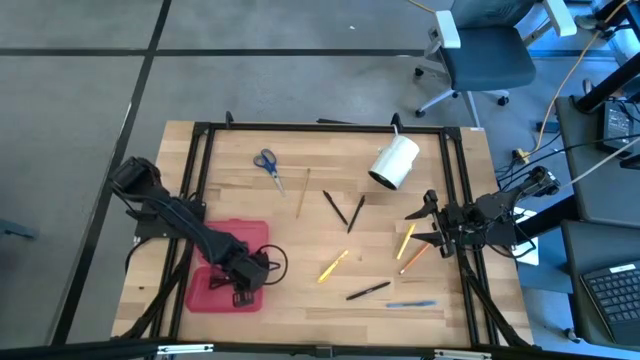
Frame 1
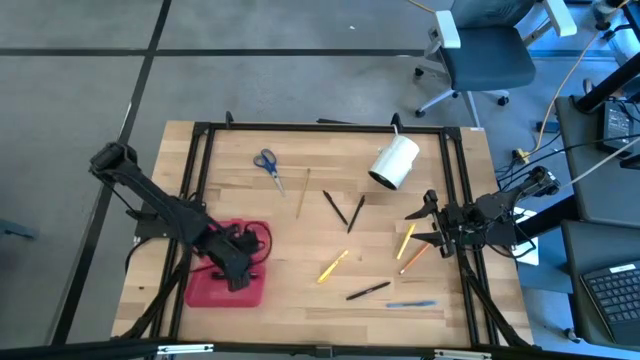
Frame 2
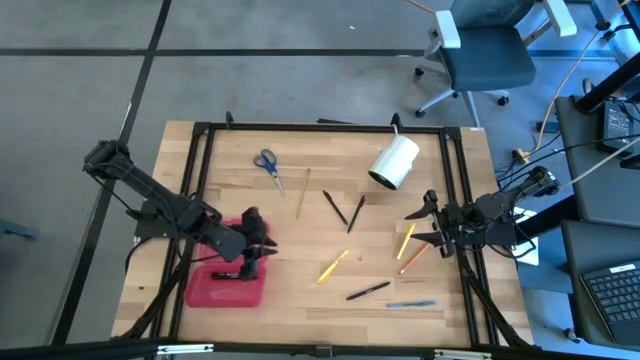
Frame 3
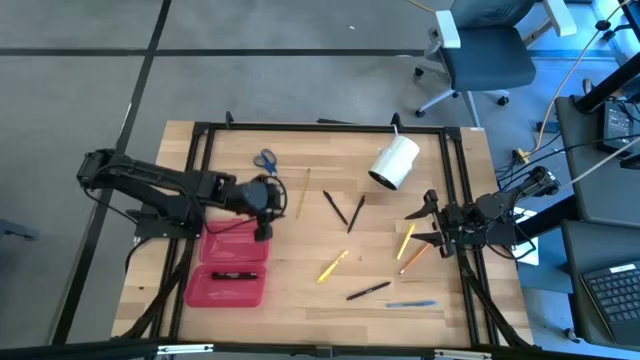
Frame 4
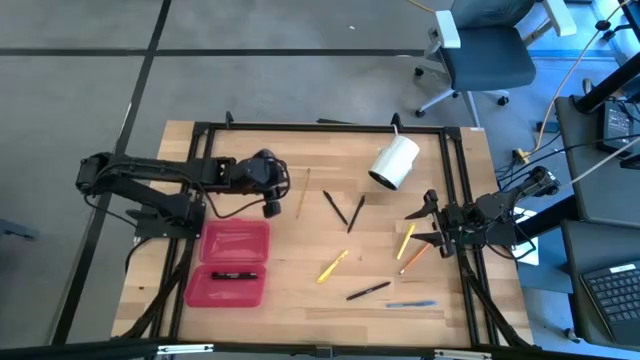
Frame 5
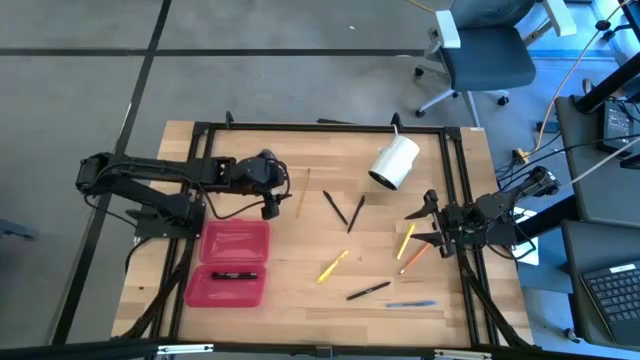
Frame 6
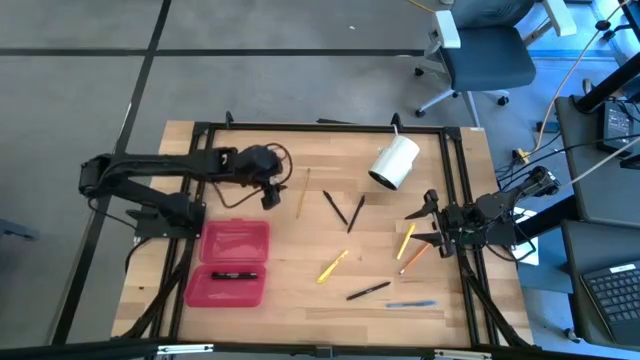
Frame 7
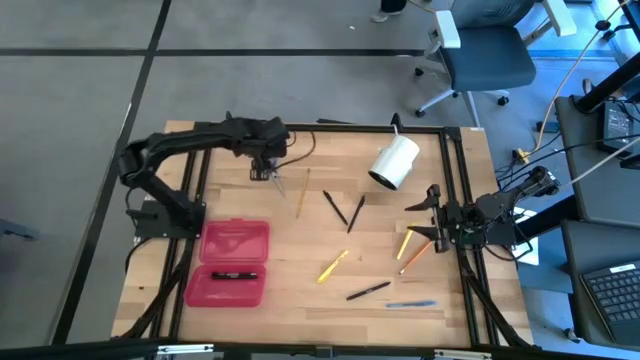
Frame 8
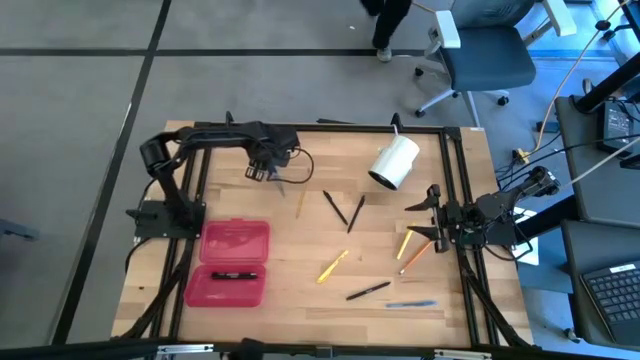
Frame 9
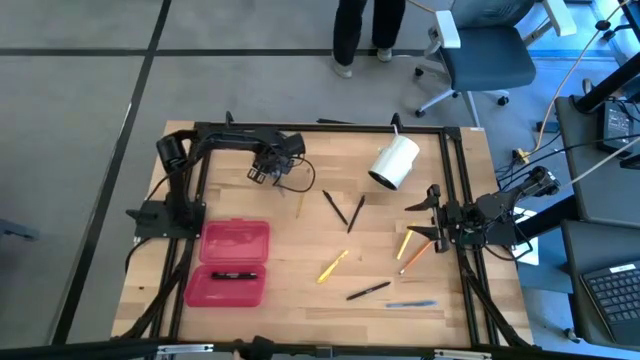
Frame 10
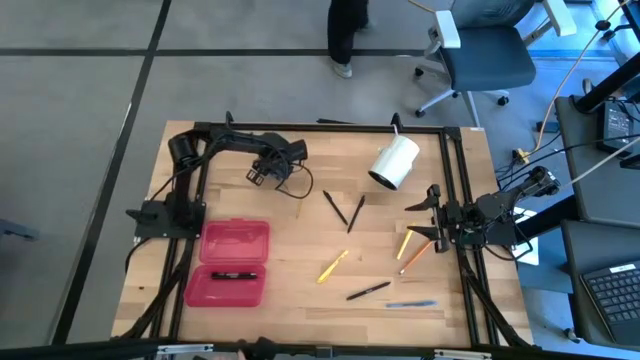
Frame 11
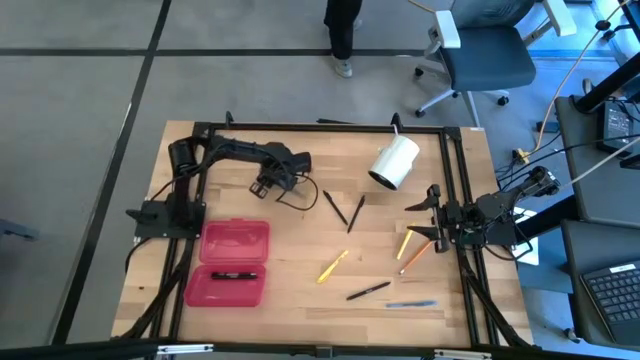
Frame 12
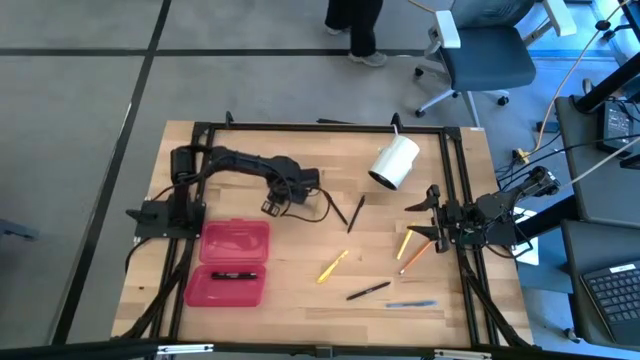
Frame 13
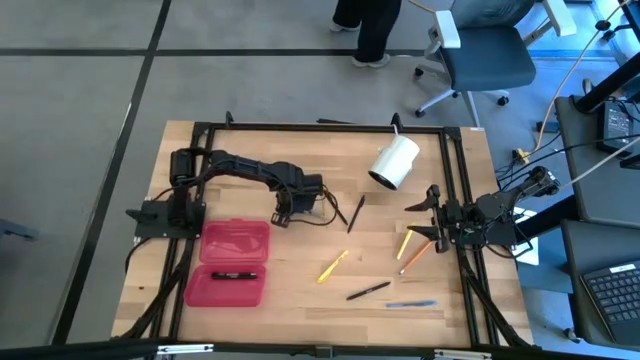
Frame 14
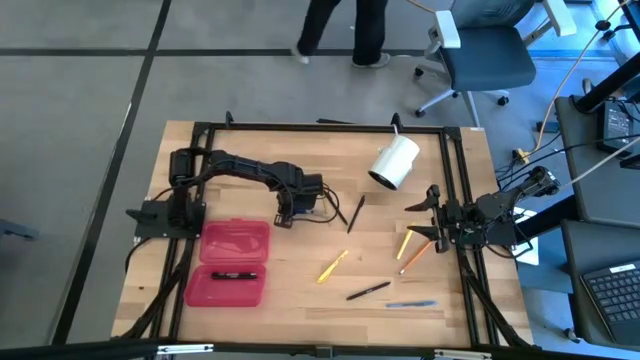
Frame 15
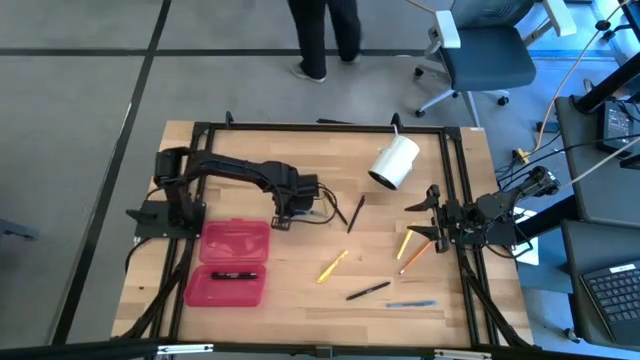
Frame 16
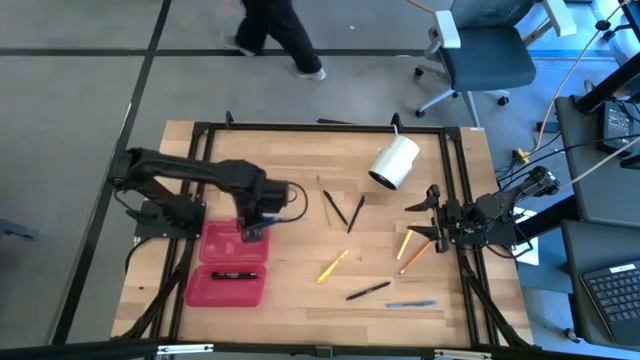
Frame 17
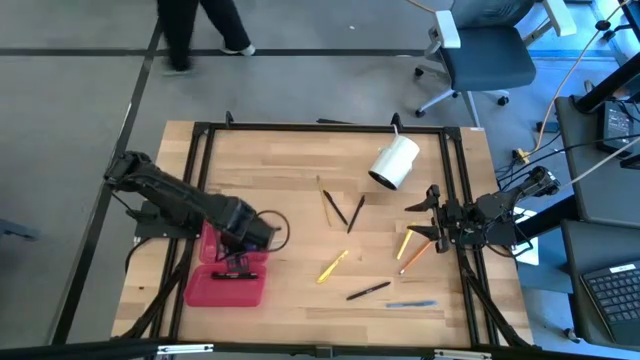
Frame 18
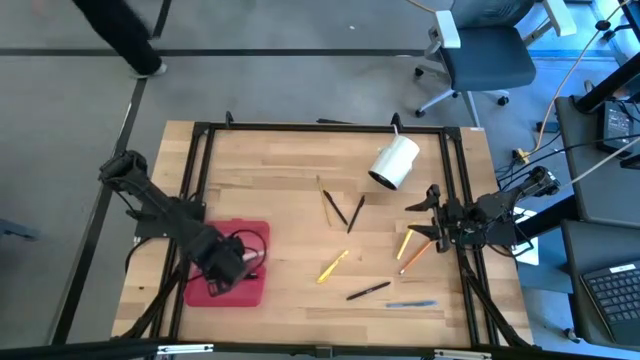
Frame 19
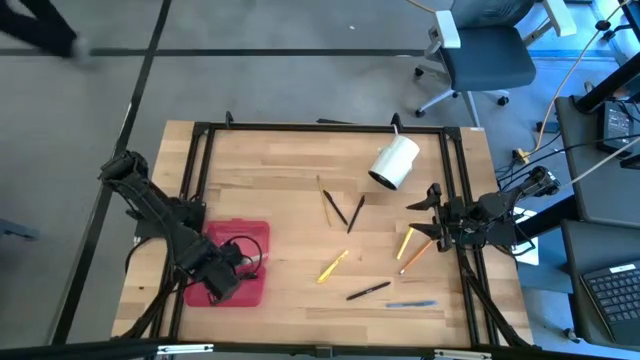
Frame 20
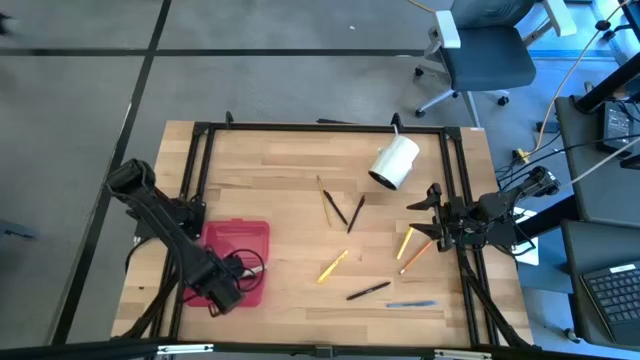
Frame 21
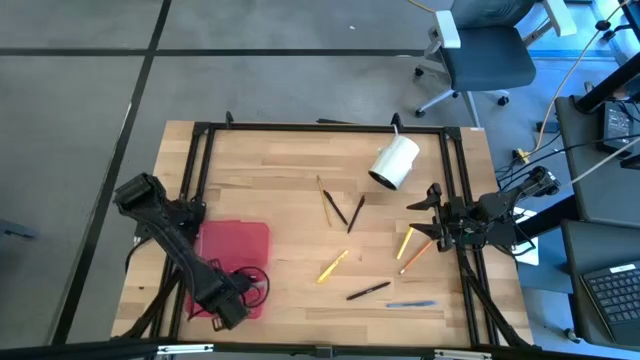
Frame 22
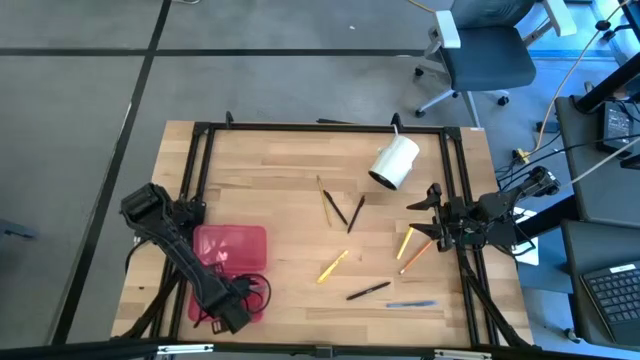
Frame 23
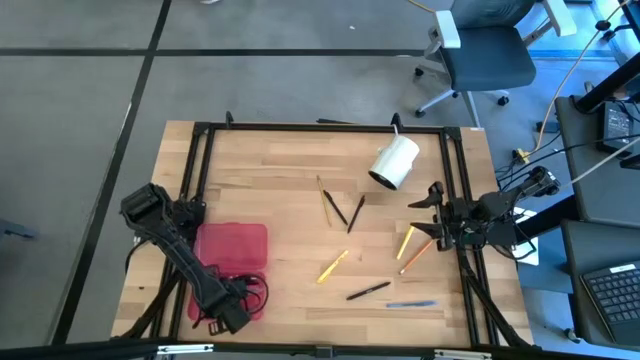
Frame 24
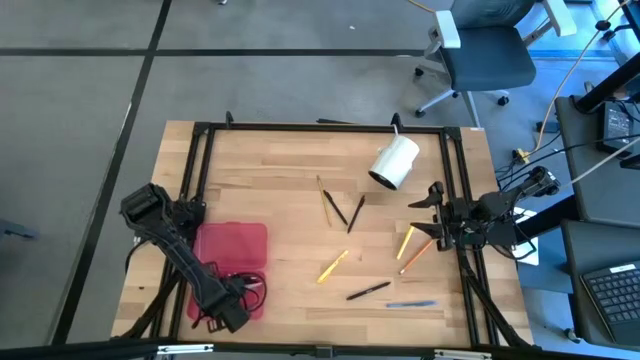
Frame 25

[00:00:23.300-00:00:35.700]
Task: Pick & place school supplies into a supply box
Put the blue scissors into the red supply box

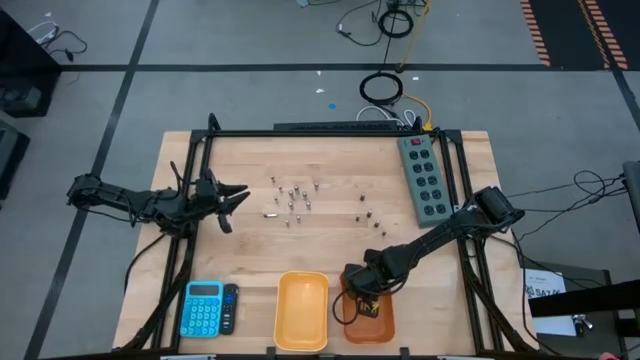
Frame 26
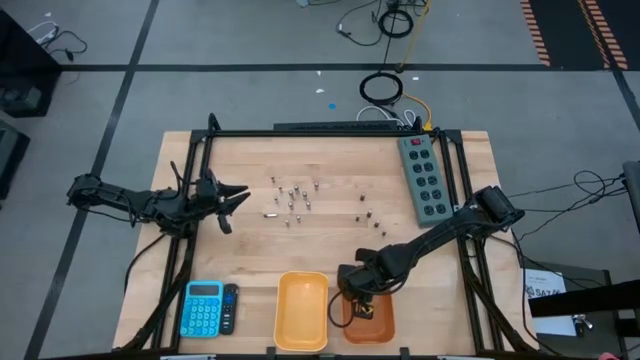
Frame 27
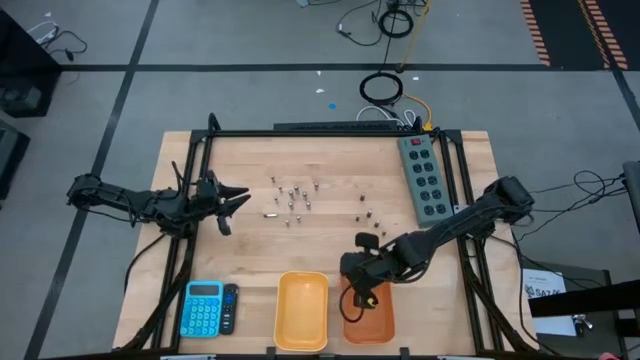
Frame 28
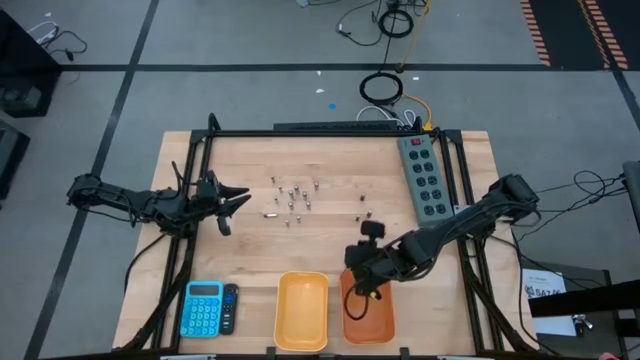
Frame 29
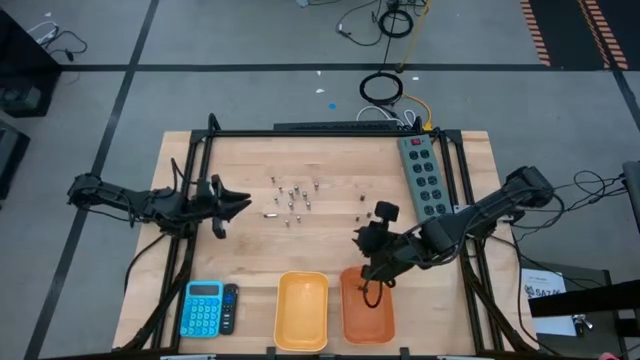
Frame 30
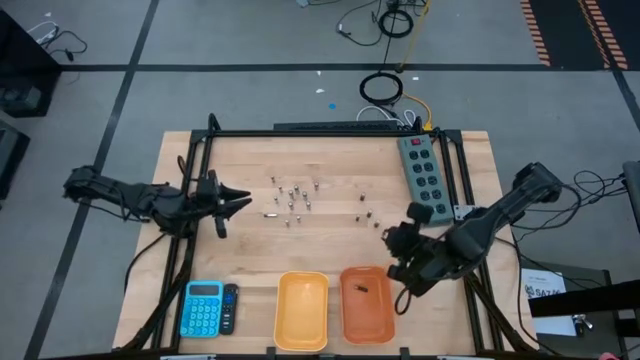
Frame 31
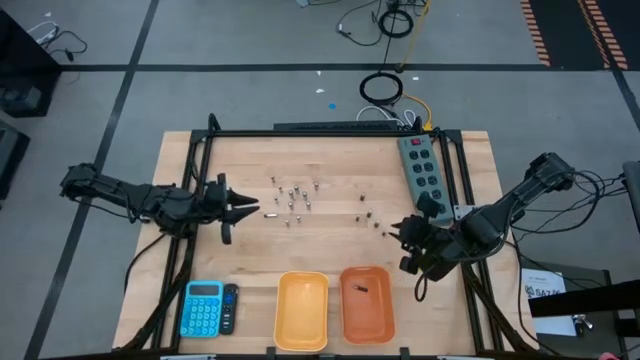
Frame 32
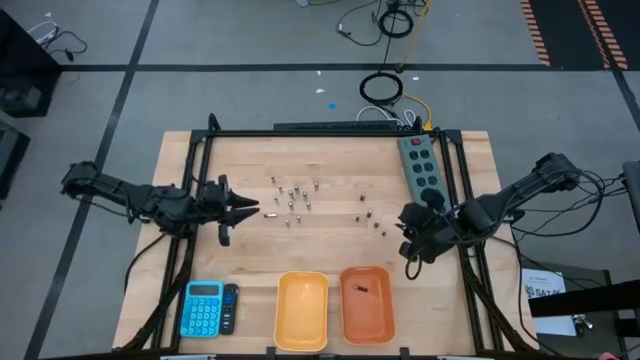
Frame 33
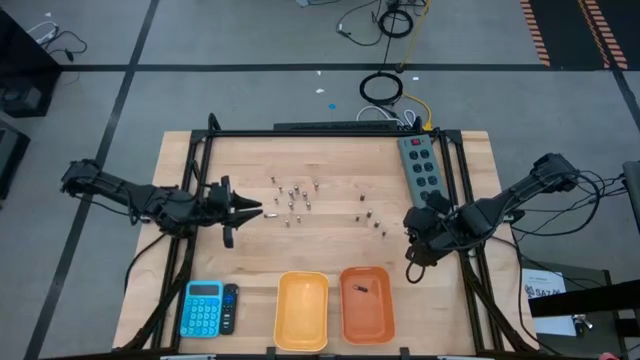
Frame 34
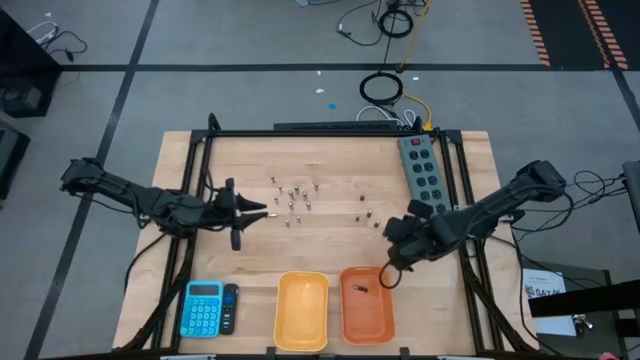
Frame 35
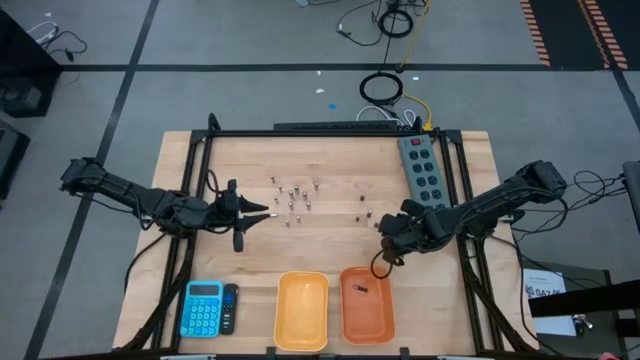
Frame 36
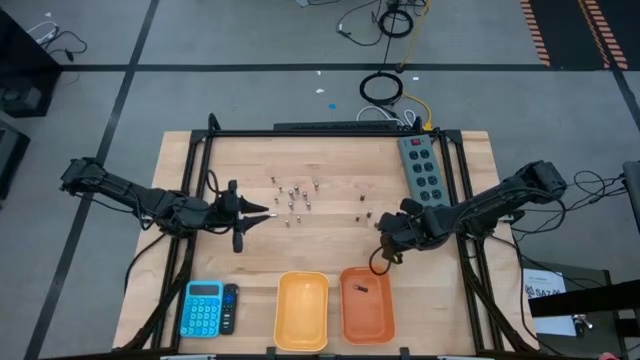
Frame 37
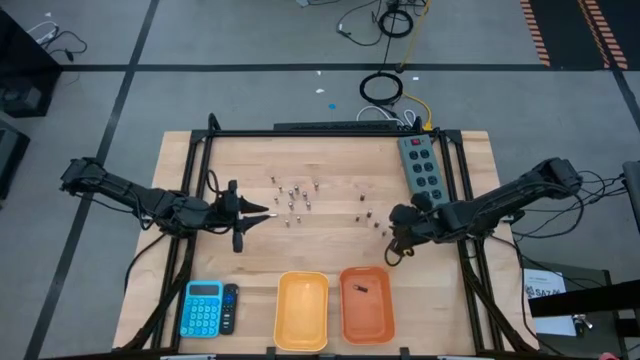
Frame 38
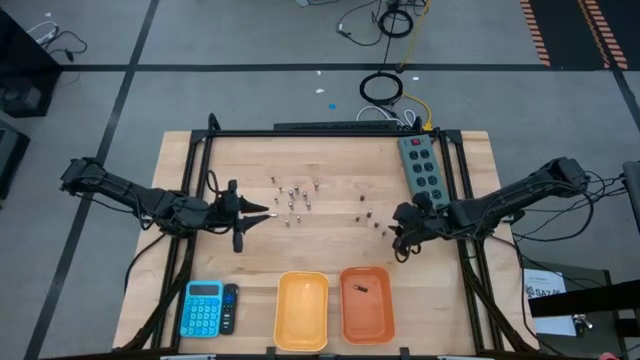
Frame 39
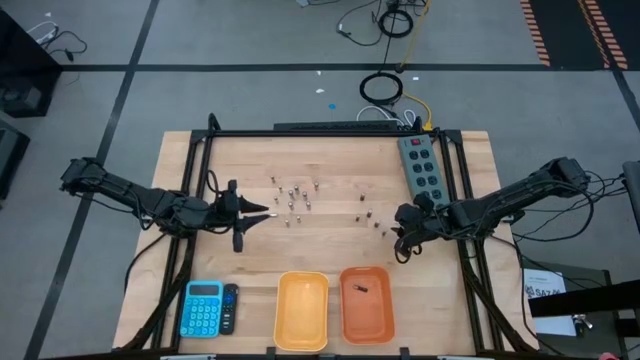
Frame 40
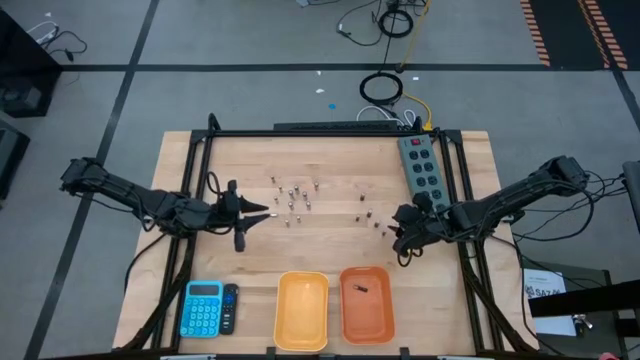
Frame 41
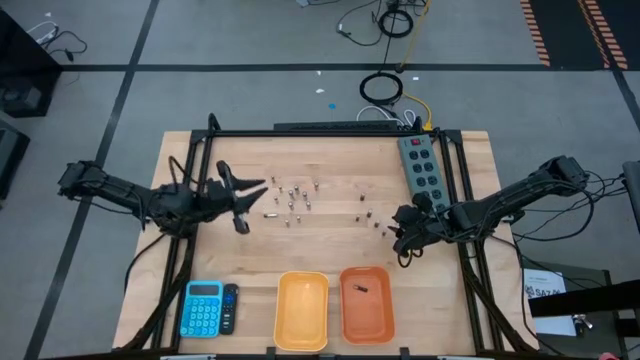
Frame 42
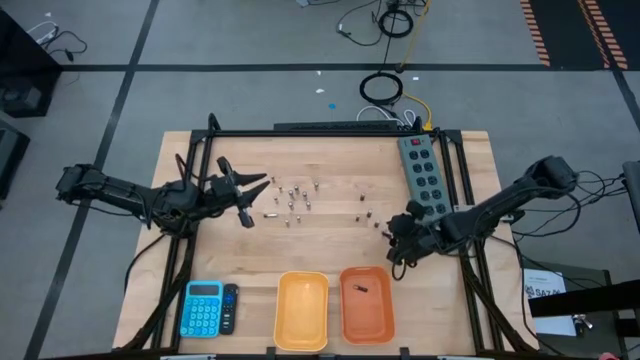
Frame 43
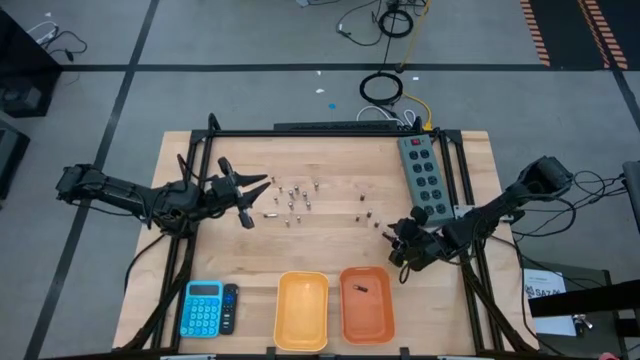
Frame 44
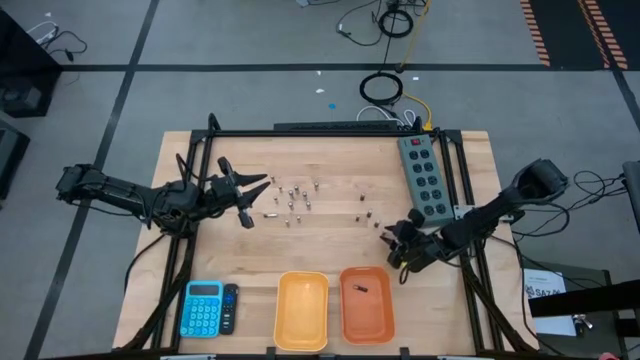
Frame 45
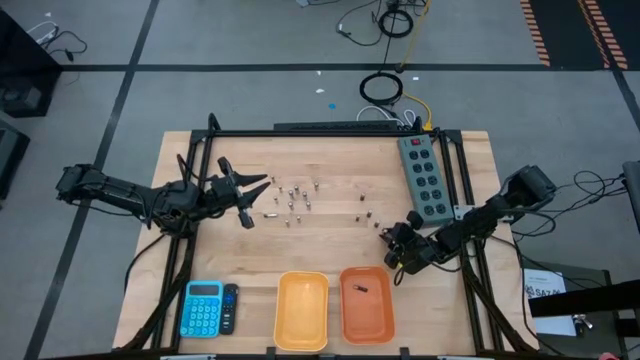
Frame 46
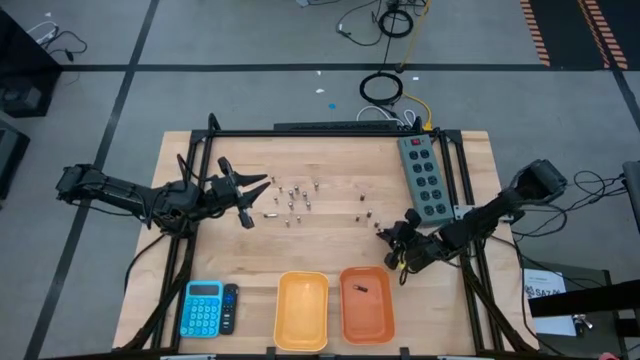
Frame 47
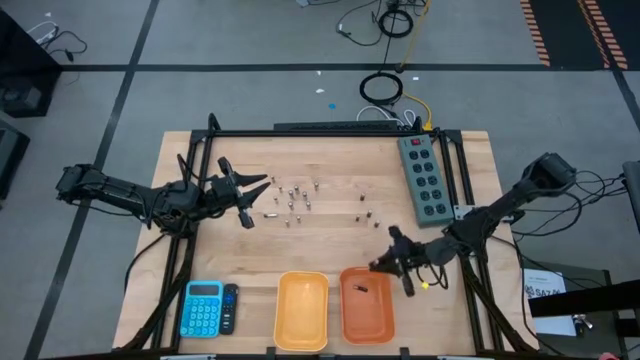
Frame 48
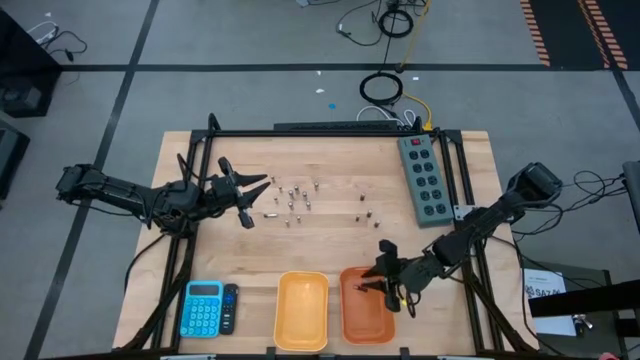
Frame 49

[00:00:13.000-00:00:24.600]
Task: Sort batteries
Put the black battery into the orange bin
